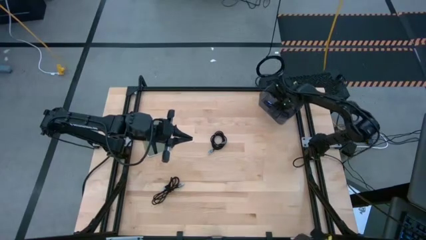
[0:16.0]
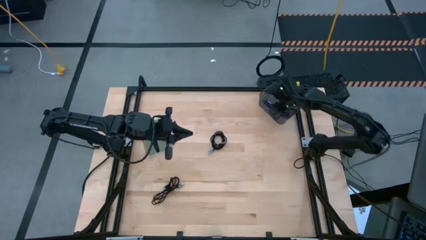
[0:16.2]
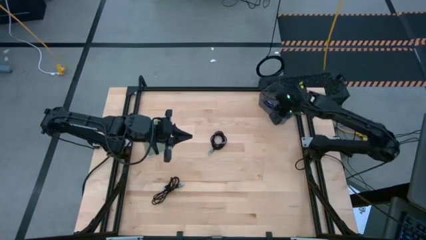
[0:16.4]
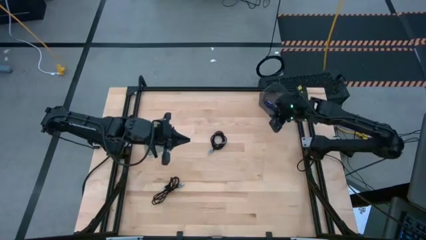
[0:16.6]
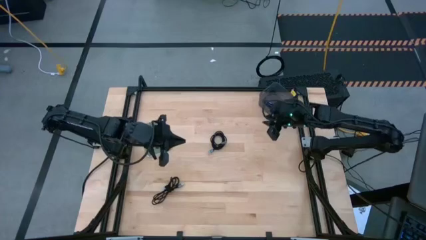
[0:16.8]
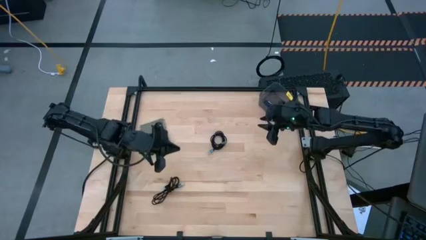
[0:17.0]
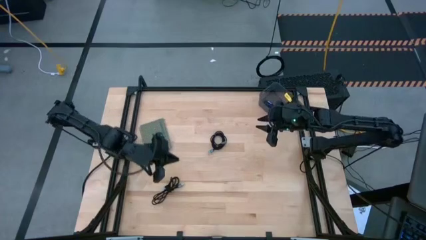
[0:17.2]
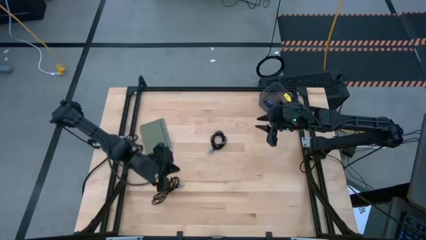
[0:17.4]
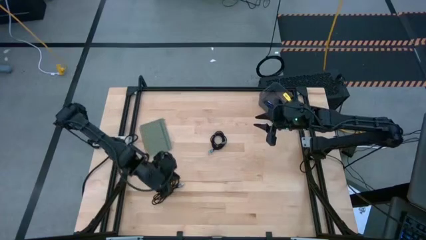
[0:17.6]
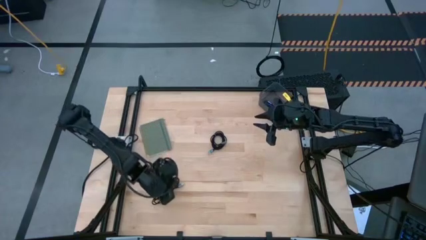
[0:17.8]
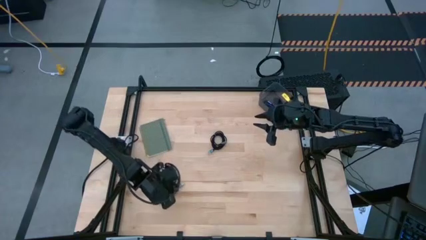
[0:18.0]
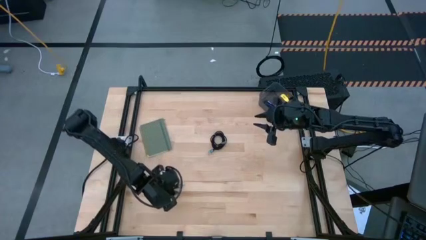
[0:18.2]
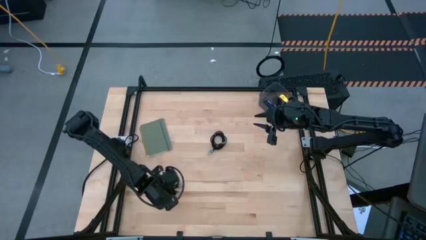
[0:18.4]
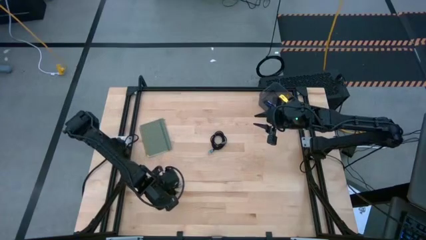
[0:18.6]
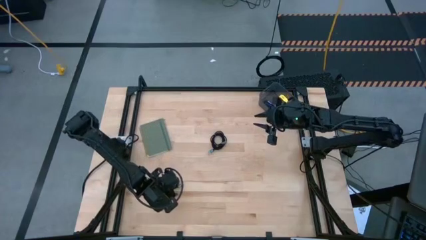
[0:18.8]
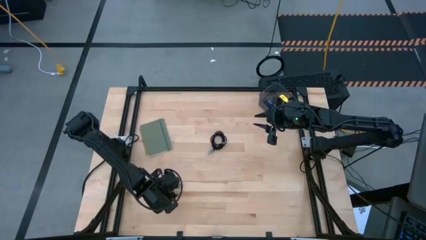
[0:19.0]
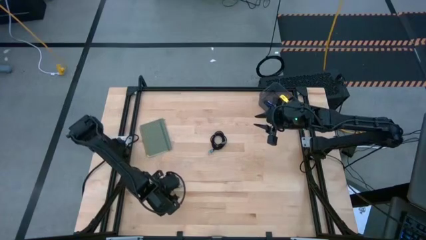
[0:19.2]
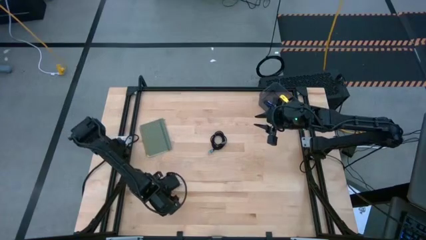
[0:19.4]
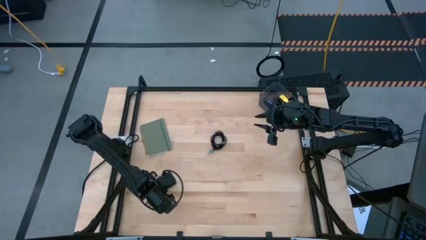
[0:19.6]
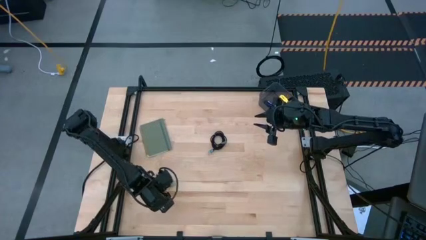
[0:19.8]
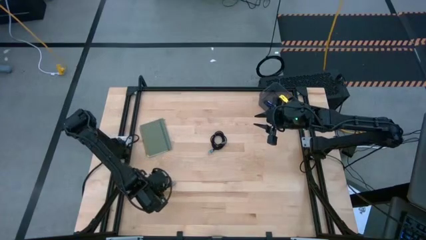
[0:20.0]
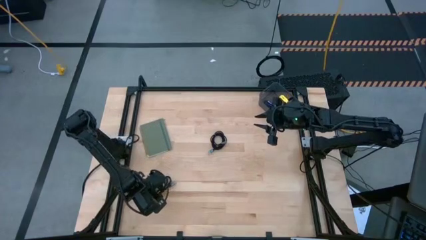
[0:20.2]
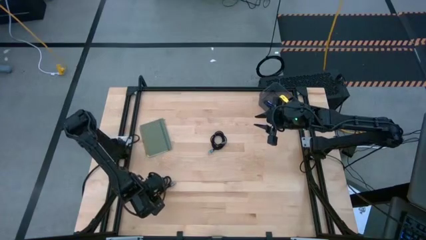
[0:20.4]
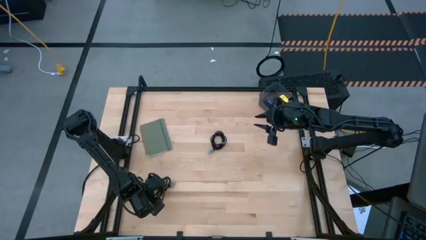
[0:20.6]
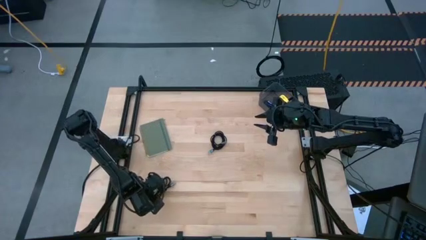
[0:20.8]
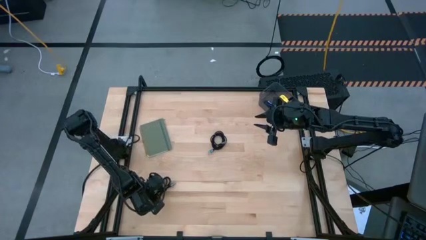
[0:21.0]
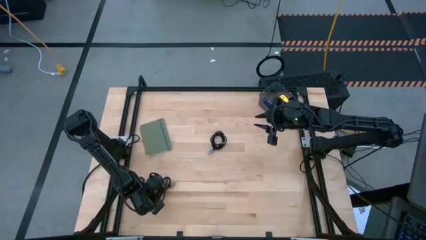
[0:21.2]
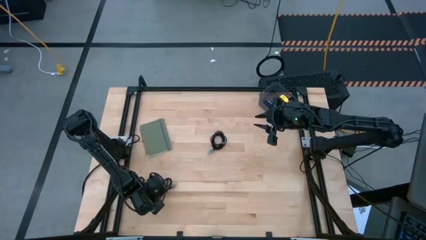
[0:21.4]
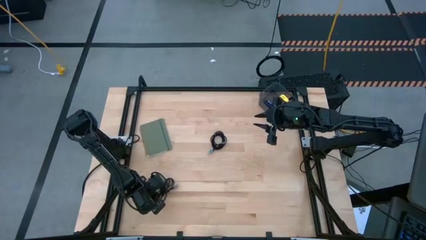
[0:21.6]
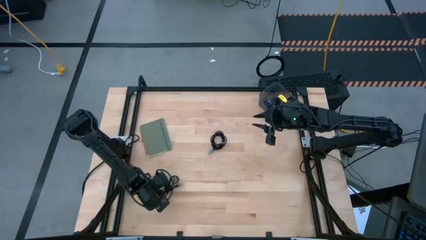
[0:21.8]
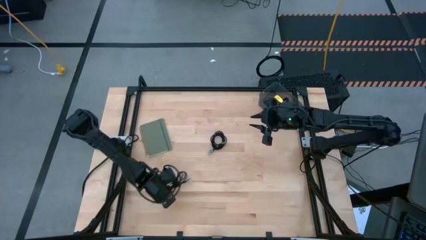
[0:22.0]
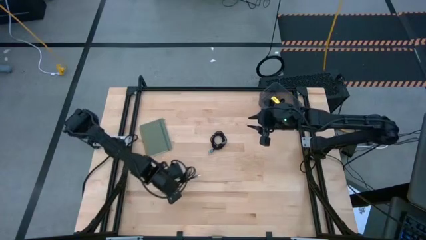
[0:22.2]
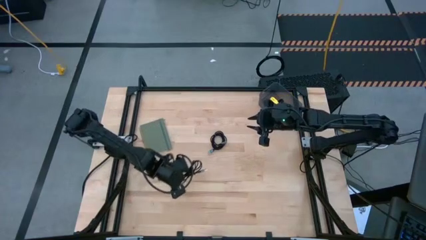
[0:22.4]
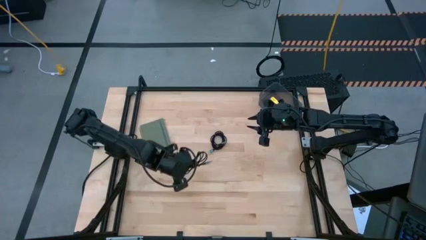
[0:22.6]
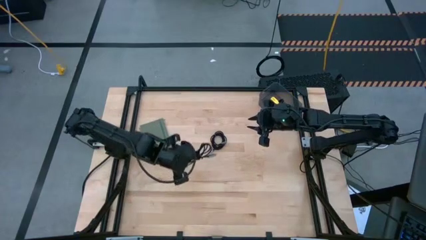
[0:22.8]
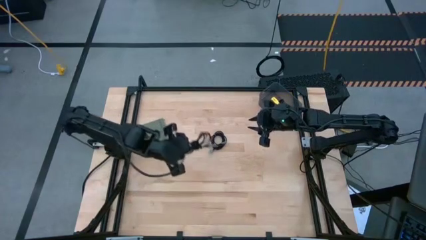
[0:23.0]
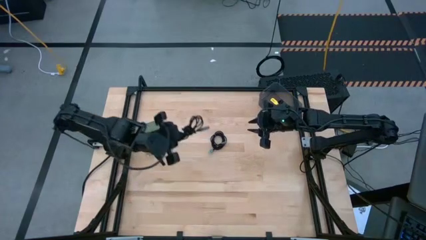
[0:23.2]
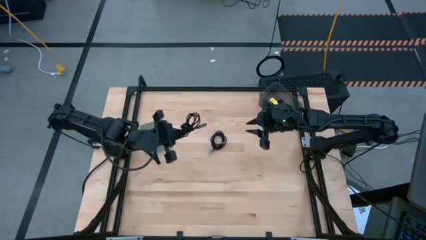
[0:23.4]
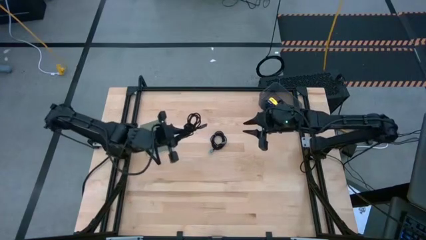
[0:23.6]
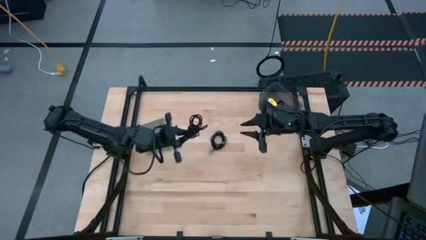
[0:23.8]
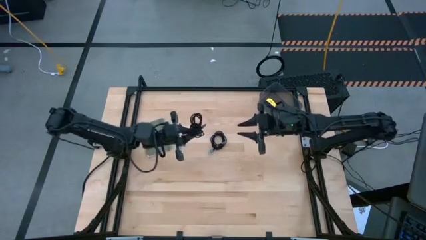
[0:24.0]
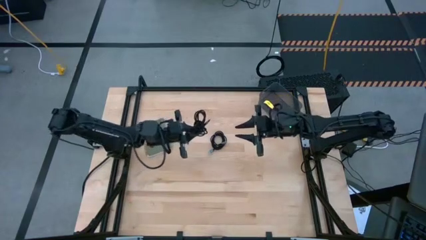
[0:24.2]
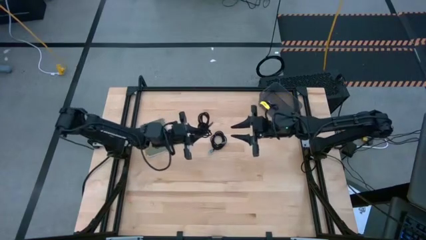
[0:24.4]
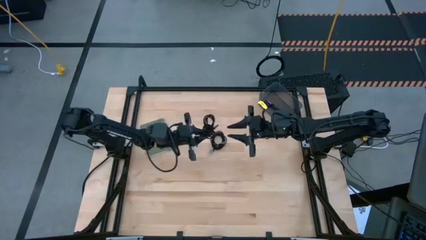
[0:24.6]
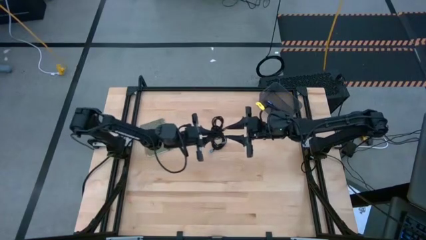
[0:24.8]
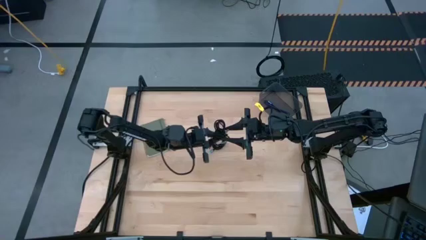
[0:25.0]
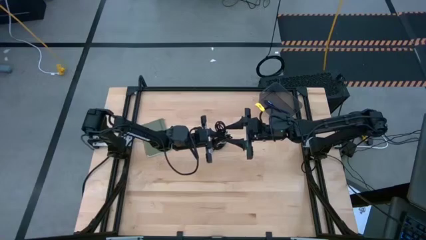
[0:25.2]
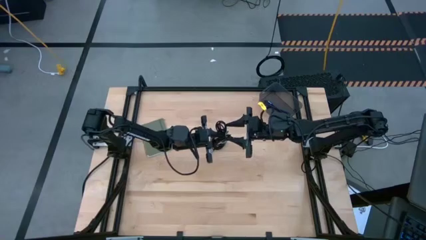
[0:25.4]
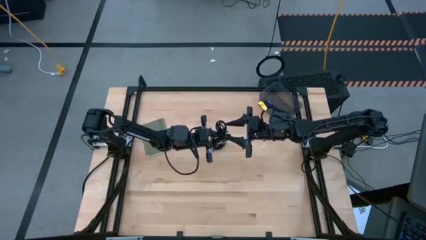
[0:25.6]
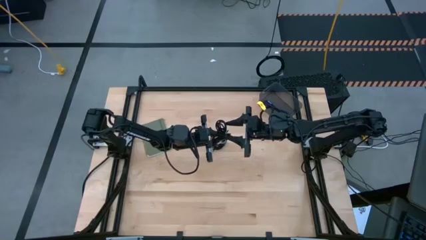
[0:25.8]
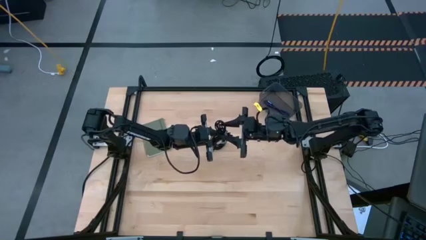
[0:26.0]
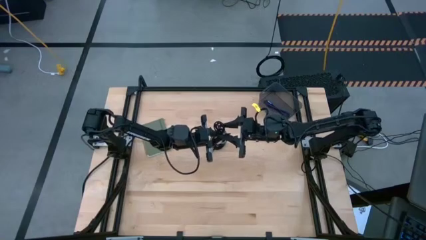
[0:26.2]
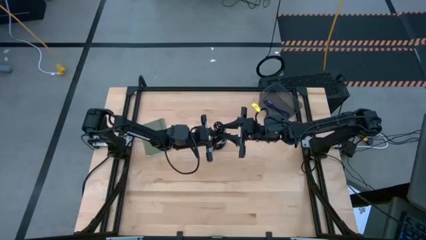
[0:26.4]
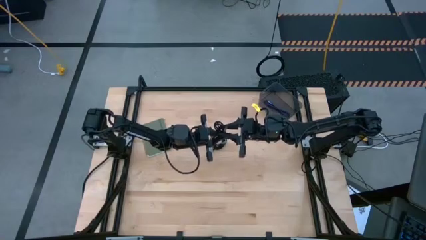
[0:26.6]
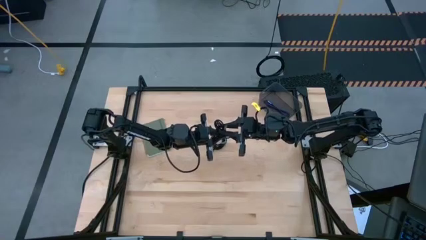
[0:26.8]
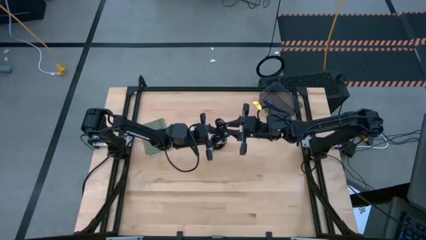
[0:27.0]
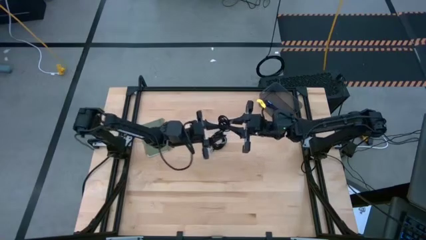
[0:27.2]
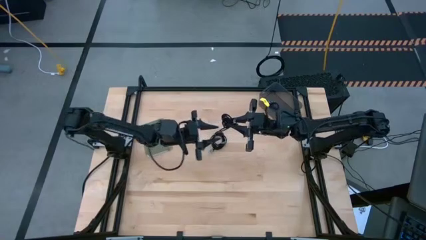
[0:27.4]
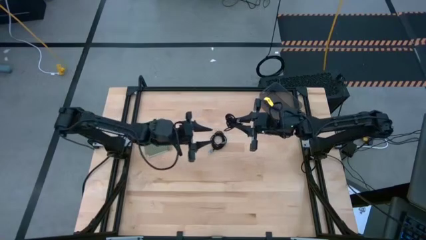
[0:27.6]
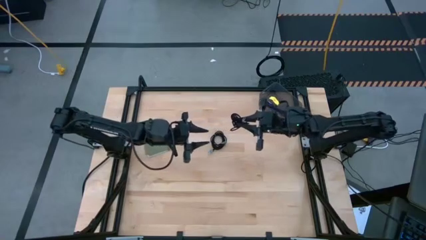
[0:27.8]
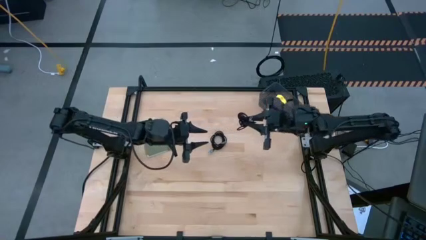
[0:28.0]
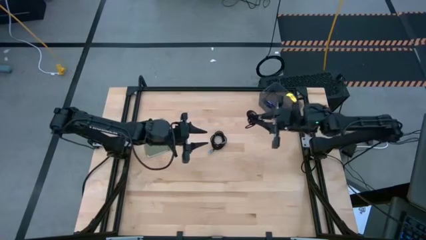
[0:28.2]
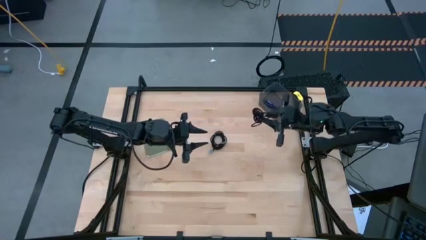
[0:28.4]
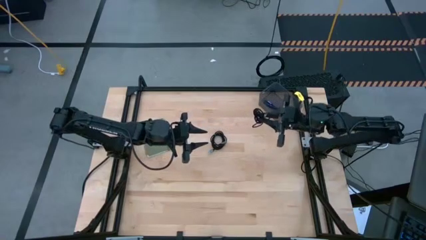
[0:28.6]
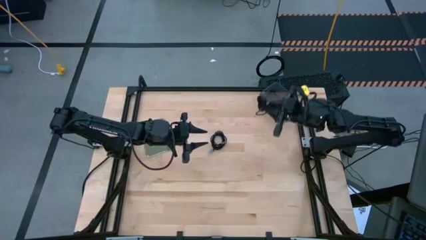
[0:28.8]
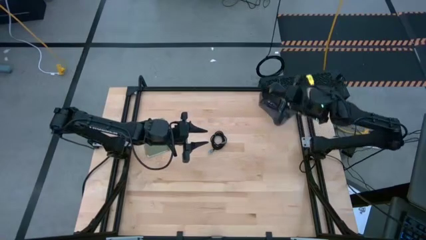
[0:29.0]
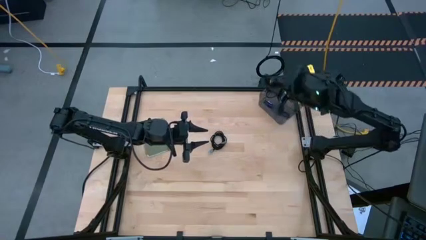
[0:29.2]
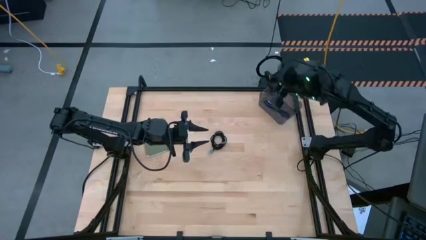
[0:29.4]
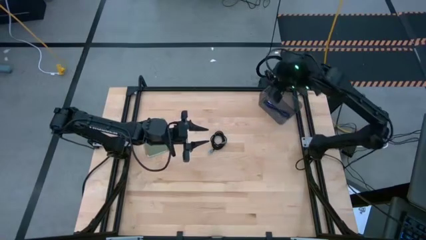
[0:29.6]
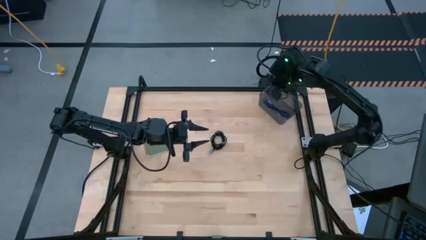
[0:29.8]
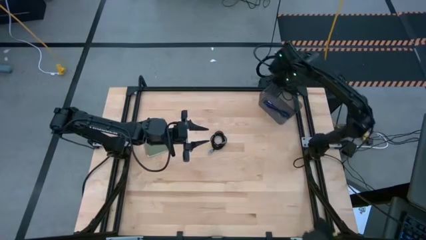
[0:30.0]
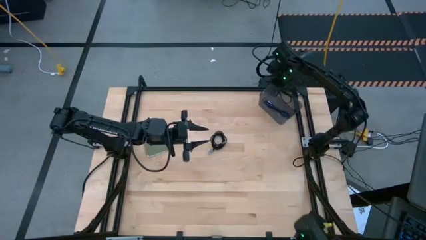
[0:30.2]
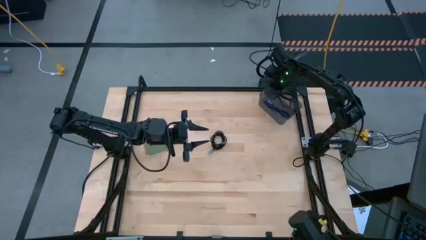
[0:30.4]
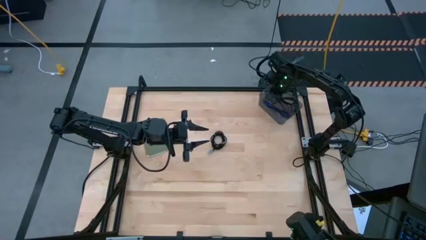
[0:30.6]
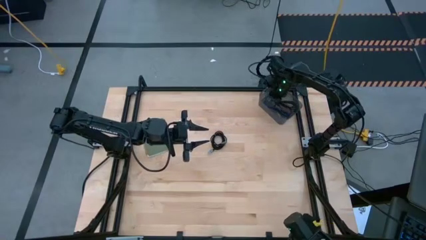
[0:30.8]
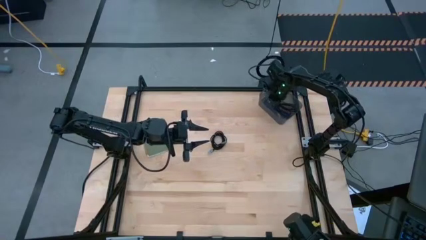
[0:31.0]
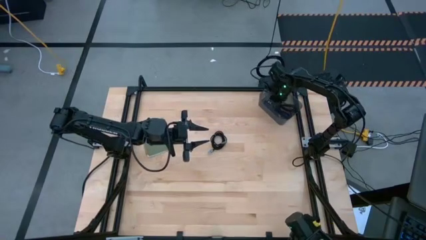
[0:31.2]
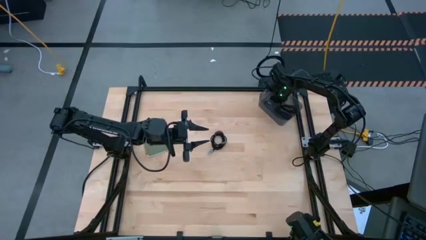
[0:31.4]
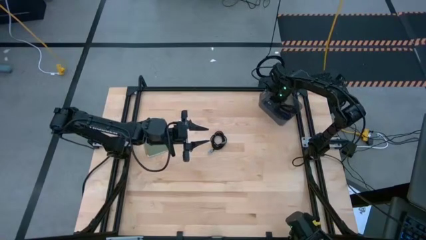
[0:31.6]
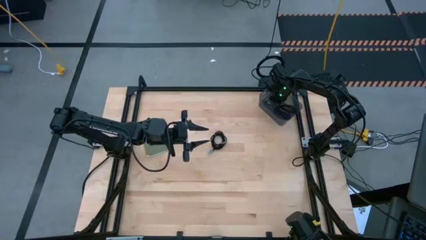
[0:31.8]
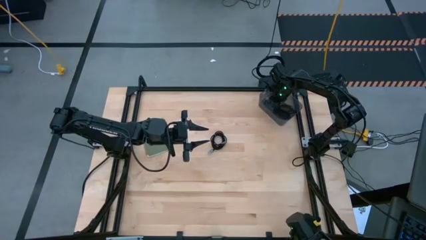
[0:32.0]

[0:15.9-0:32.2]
Task: Pick and place USB-C Cables
Put the bottom black charger cable into the black bin
